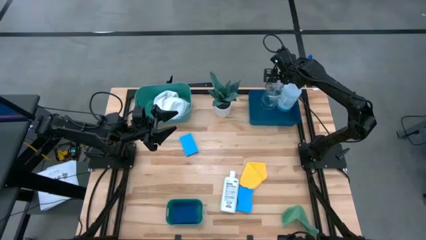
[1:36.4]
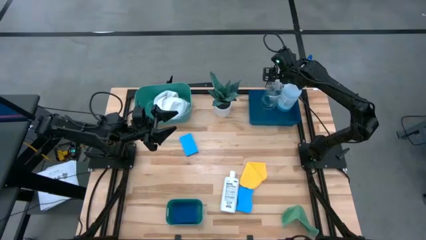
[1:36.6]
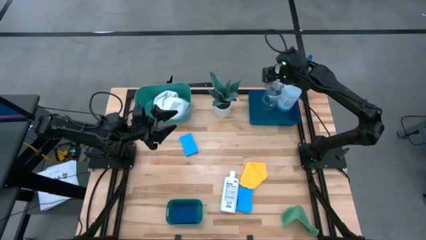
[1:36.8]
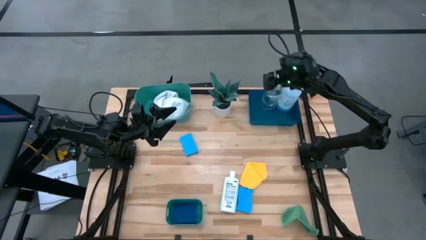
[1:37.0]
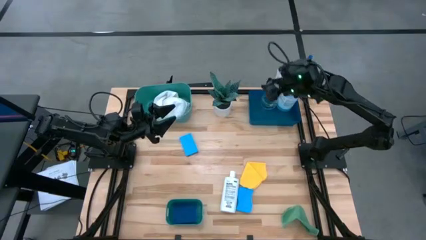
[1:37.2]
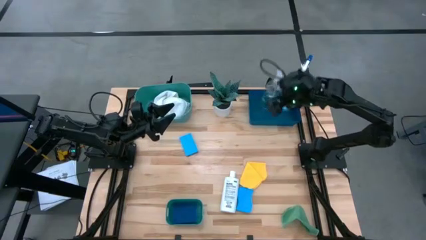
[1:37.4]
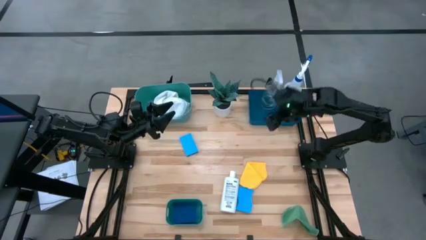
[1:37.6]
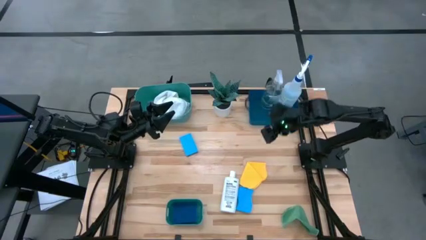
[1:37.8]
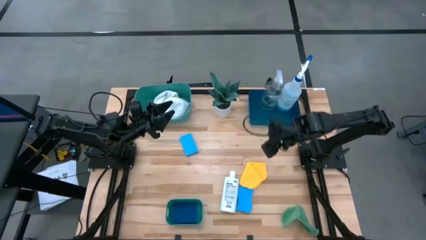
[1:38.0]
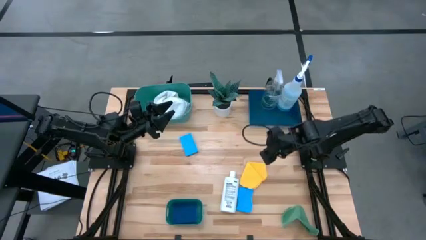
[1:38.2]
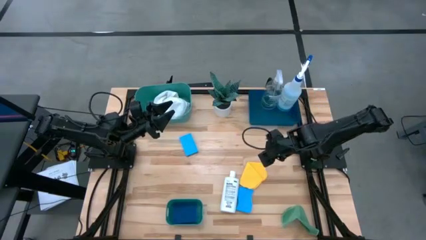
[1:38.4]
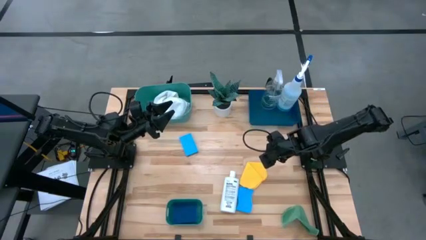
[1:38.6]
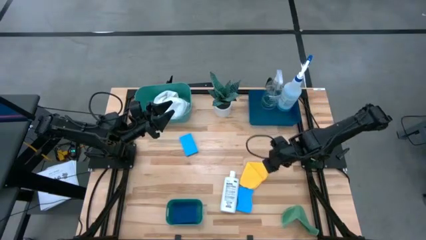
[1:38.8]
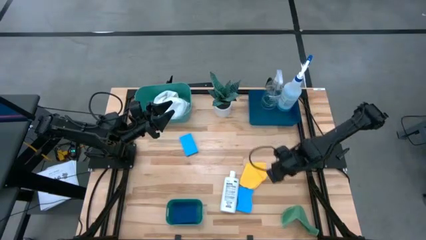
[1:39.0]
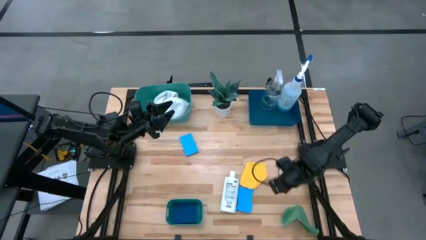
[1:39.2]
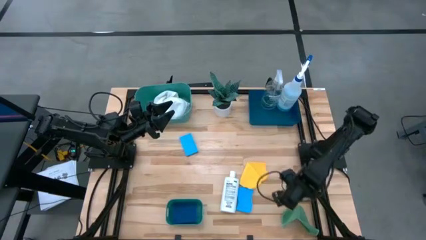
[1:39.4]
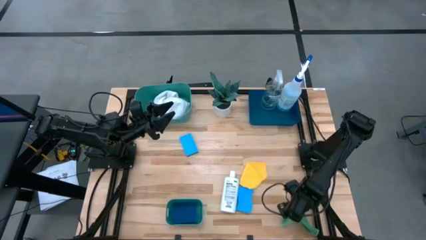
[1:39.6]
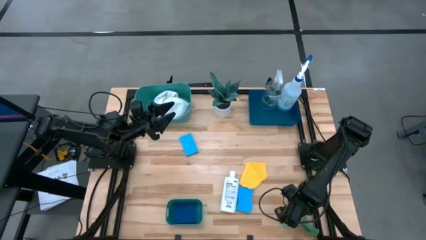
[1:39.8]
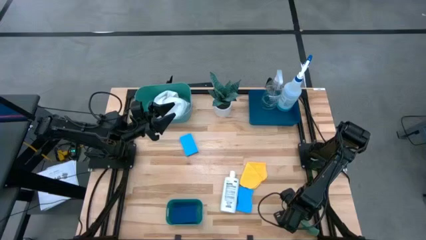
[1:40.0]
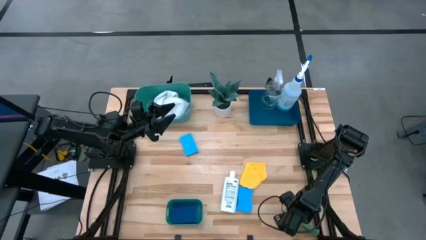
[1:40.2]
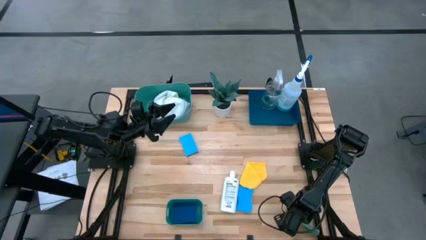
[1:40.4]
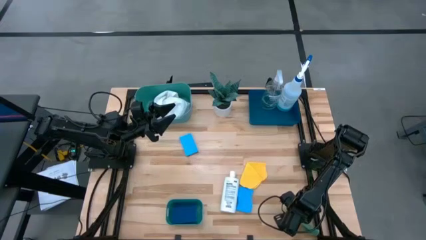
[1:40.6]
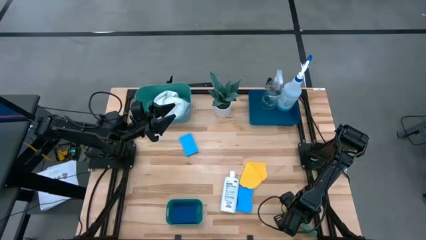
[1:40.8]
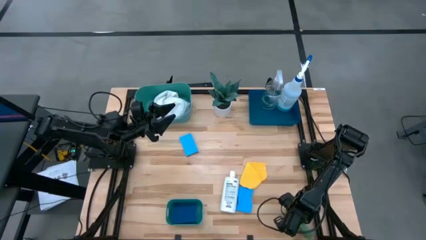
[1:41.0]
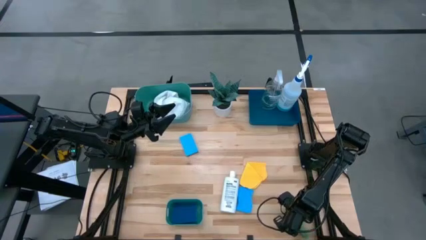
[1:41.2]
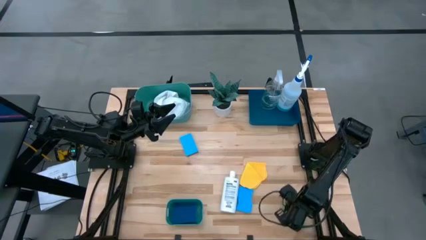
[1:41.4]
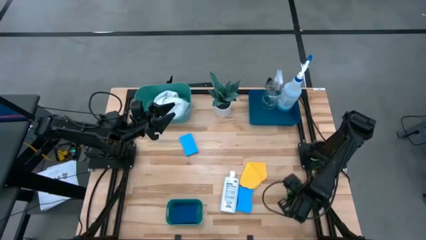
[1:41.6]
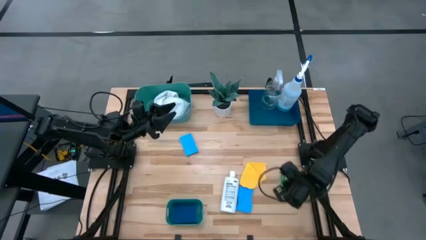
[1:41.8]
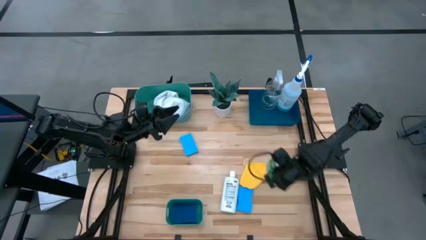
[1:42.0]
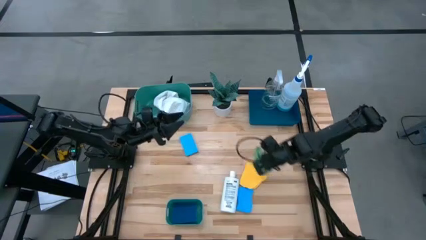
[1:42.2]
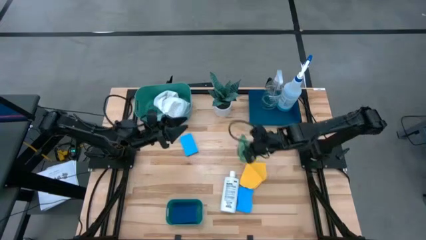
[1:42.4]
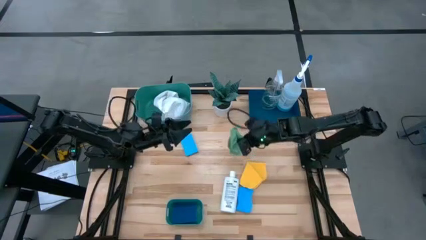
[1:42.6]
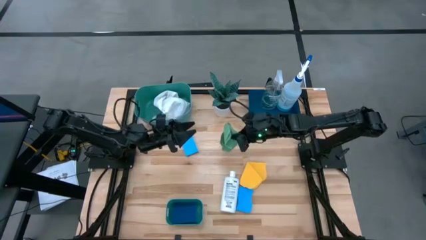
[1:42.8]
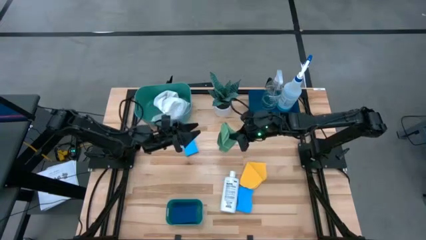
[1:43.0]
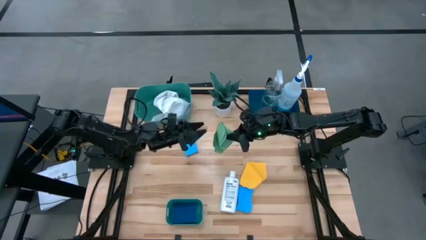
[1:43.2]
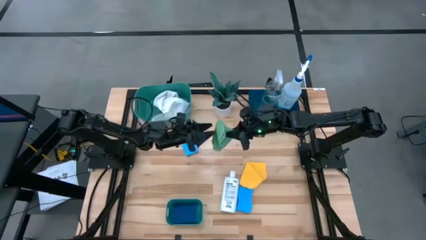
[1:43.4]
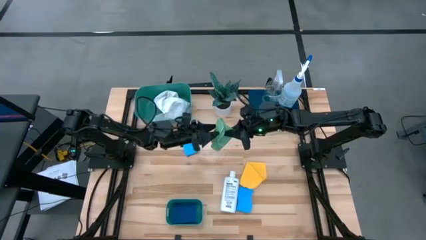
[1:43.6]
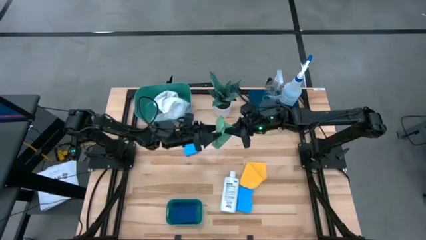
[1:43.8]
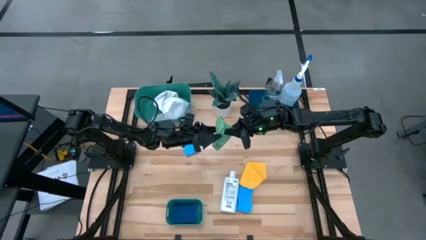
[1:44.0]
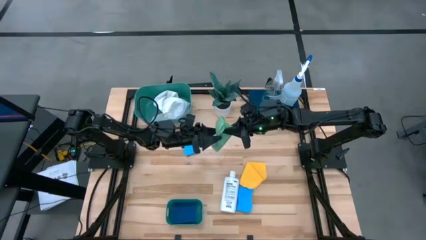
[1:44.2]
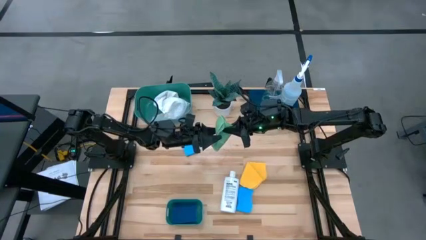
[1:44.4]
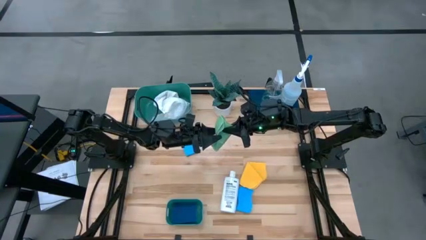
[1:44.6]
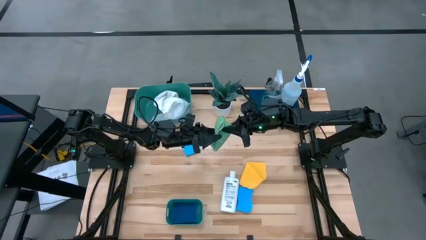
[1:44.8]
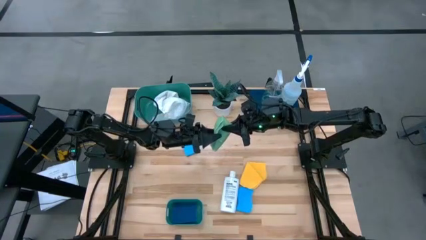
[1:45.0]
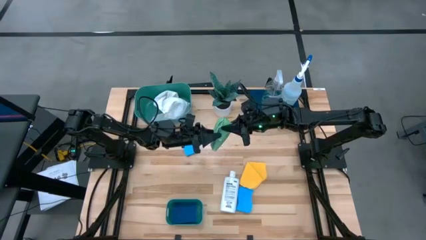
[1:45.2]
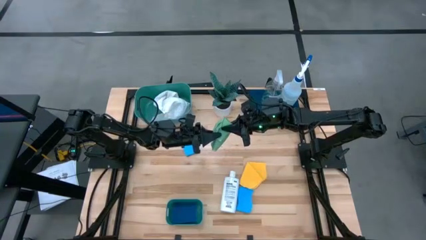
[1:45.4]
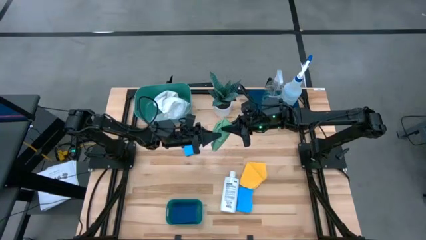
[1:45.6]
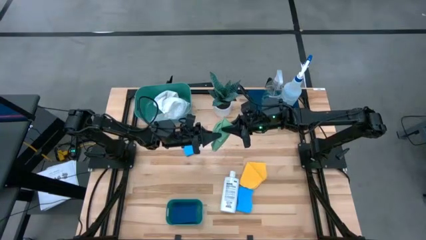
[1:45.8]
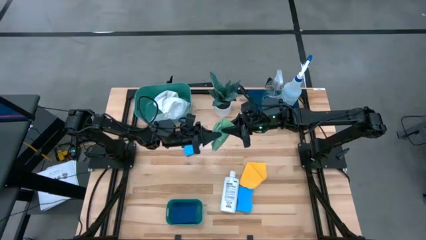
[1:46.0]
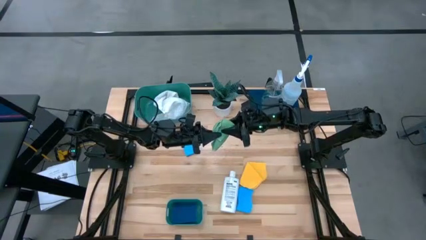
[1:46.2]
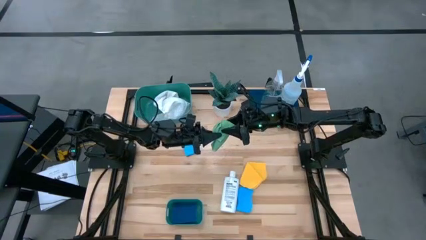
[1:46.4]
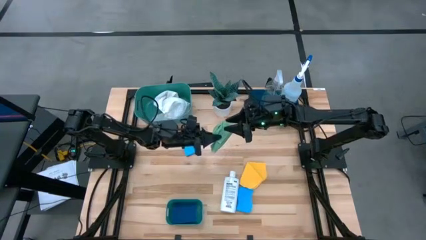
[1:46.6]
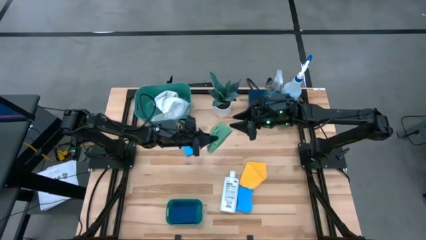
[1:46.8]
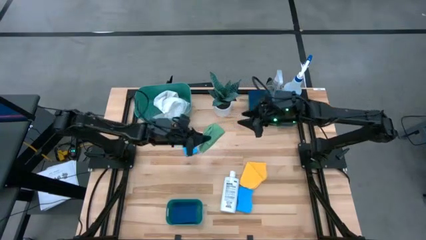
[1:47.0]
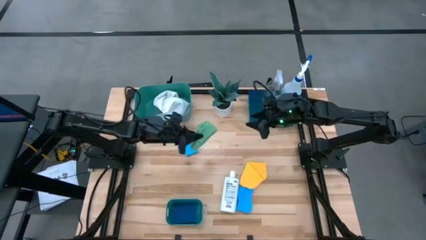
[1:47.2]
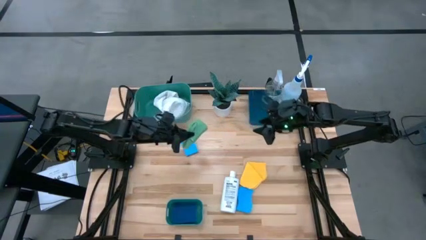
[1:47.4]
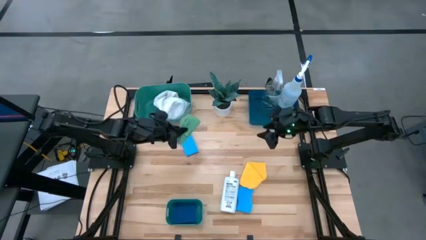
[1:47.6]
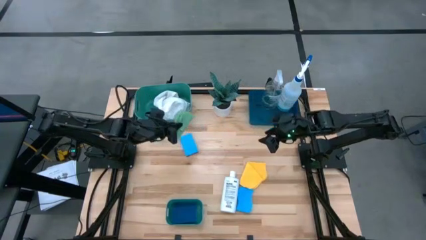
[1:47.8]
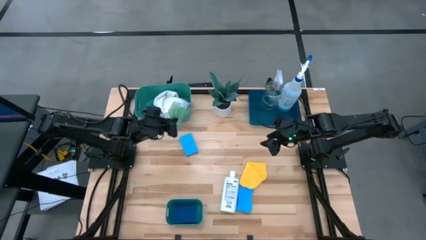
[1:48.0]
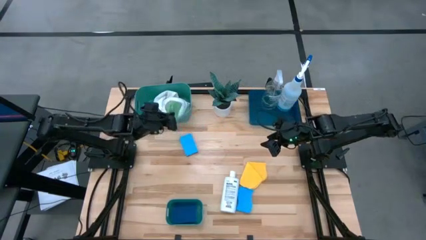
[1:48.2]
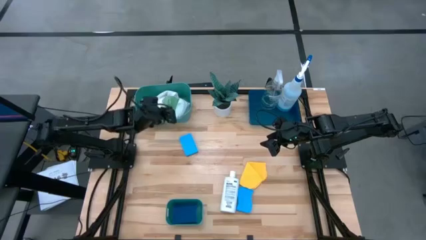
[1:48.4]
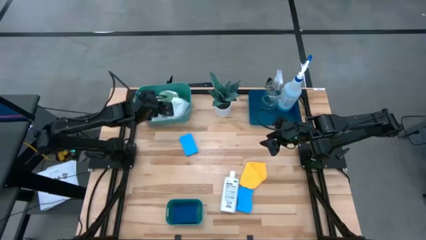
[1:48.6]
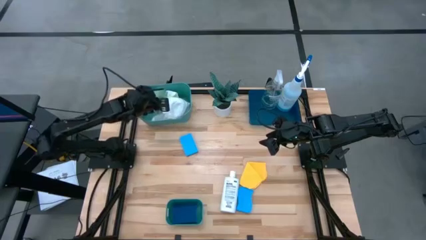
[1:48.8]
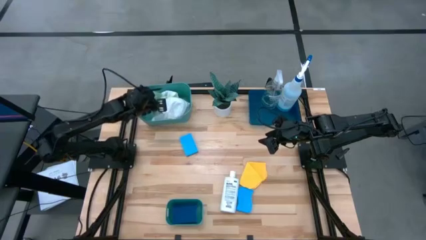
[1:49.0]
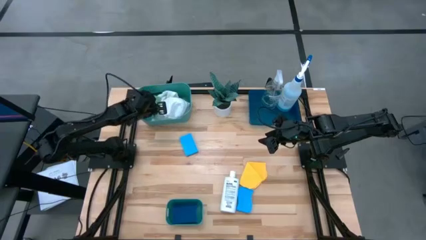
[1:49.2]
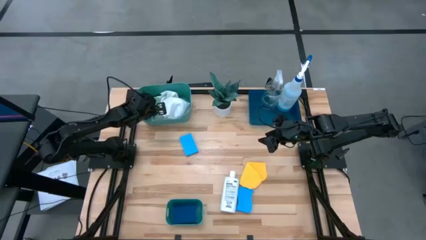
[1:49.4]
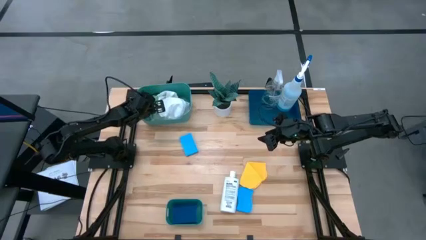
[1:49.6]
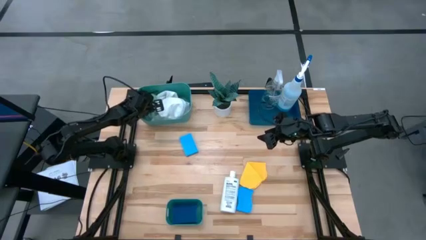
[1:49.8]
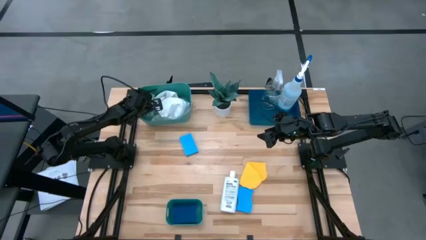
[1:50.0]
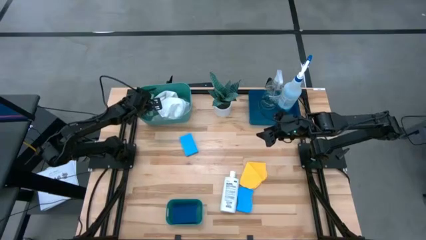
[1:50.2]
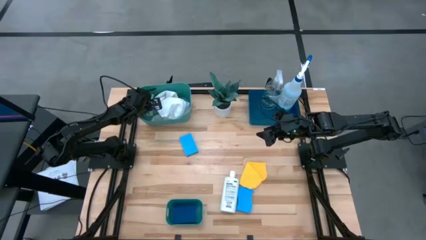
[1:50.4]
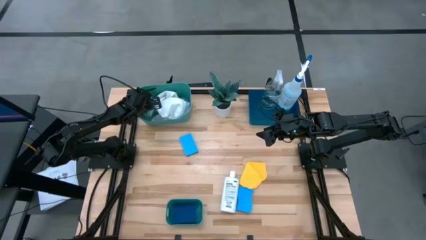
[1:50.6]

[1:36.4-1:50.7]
Task: Pick & Place Kitchen Items
Put the light green microfiber cloth into the top green bin

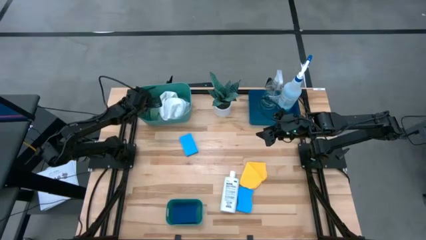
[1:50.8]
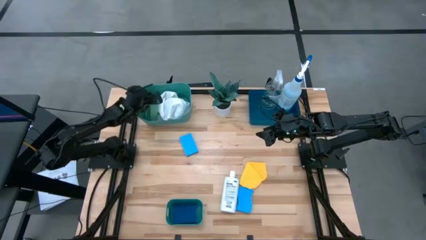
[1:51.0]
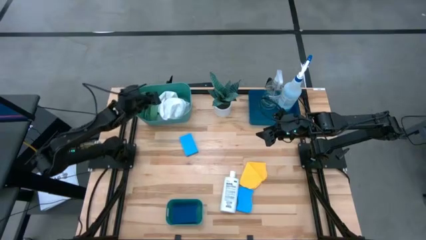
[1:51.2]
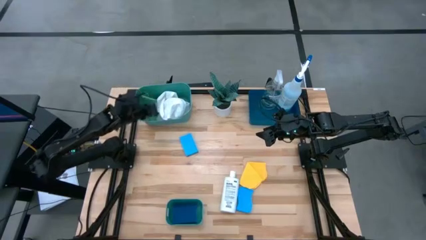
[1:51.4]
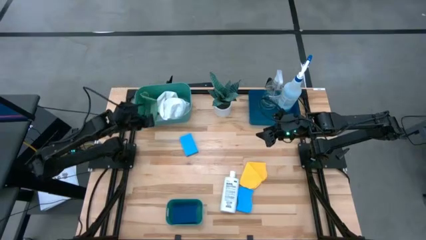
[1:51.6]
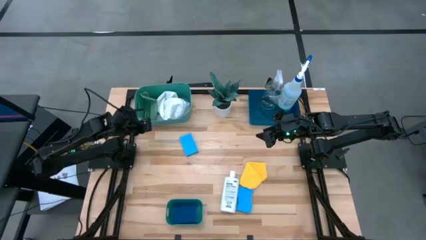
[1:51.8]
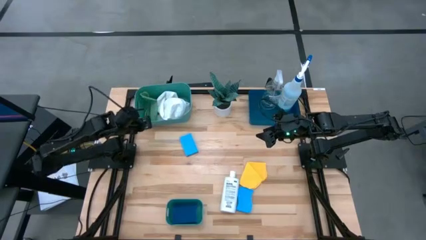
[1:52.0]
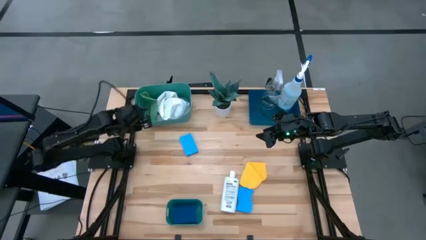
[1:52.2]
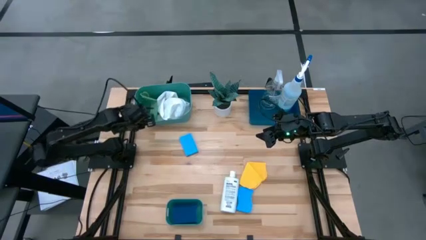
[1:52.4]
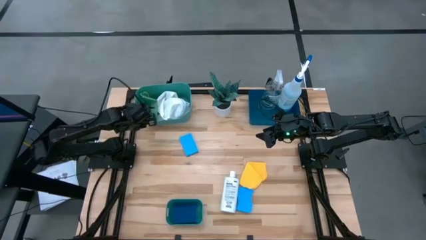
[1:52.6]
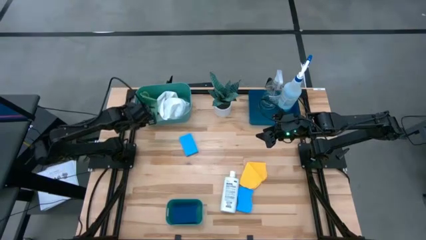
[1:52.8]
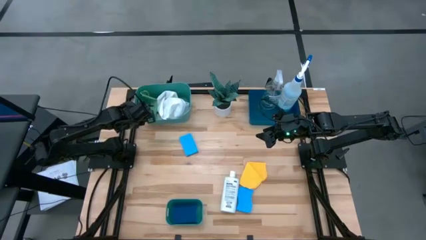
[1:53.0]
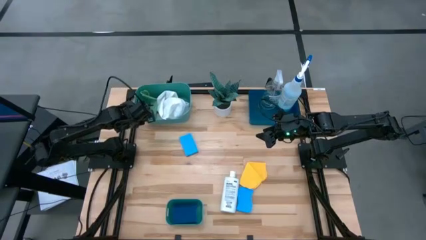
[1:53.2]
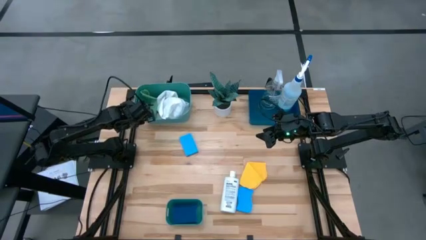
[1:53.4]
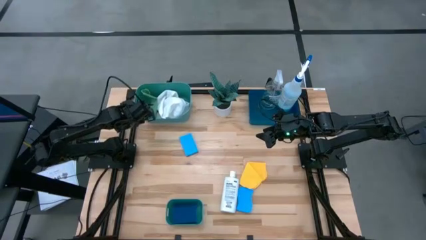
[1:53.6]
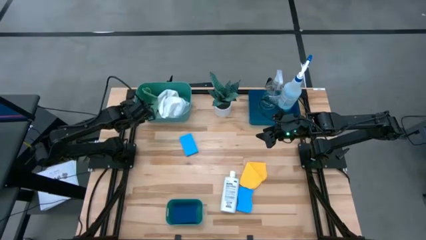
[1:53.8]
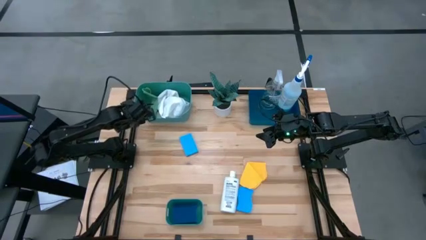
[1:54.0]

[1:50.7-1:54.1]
Adjust the top green bin
